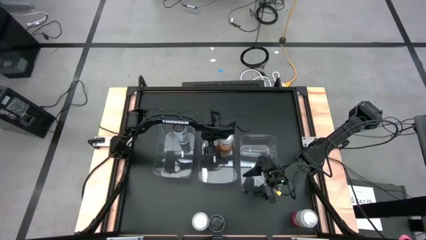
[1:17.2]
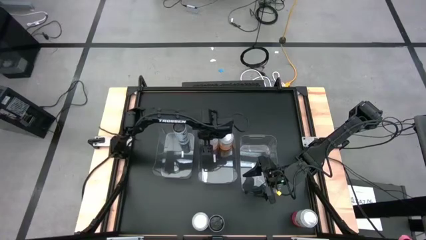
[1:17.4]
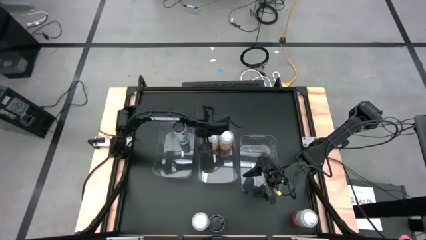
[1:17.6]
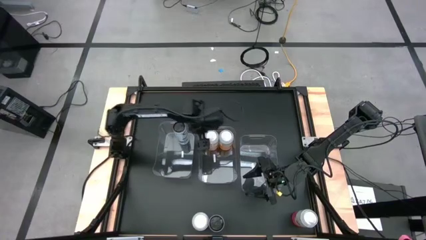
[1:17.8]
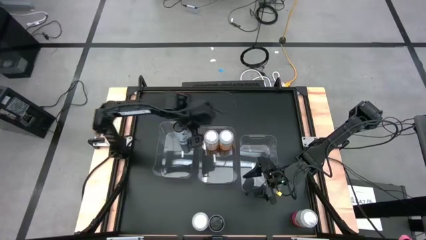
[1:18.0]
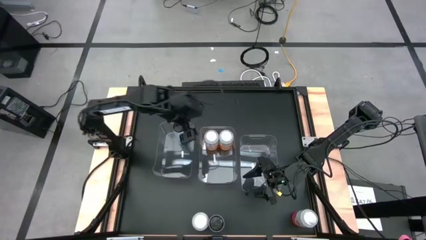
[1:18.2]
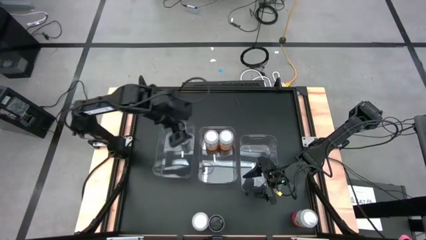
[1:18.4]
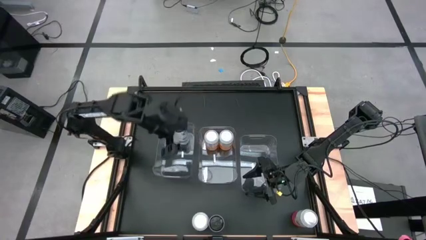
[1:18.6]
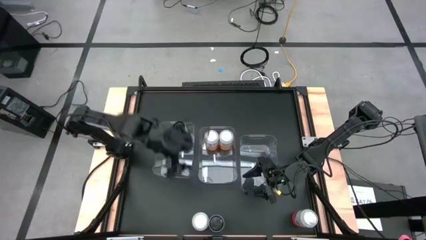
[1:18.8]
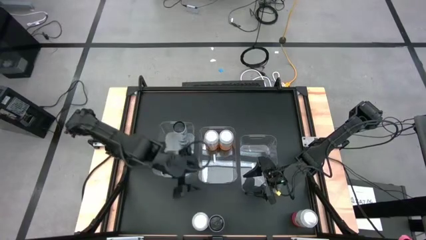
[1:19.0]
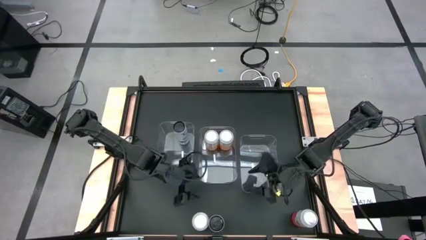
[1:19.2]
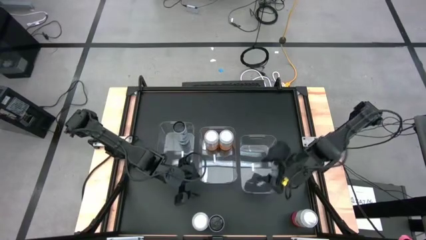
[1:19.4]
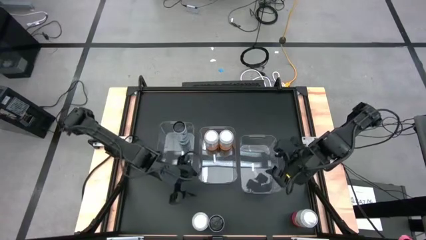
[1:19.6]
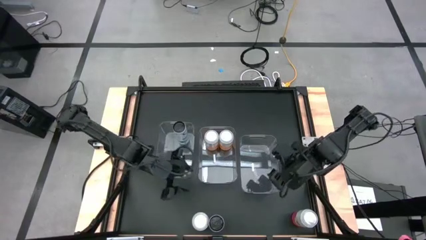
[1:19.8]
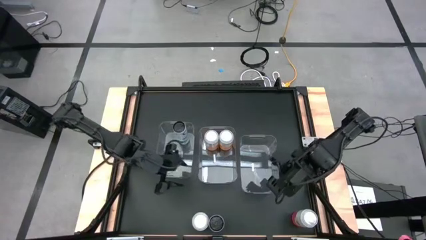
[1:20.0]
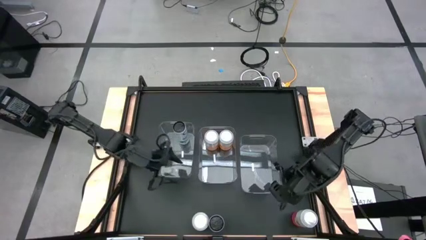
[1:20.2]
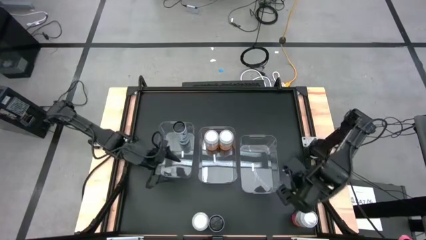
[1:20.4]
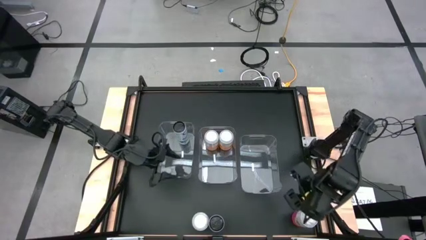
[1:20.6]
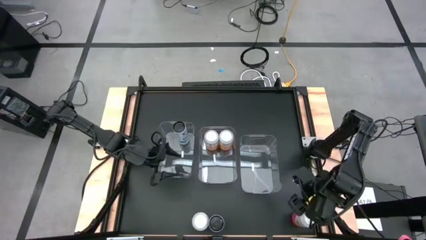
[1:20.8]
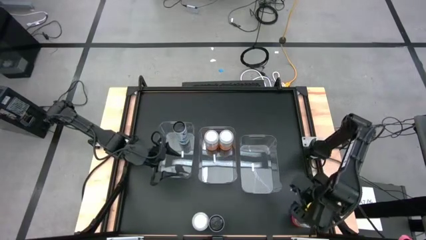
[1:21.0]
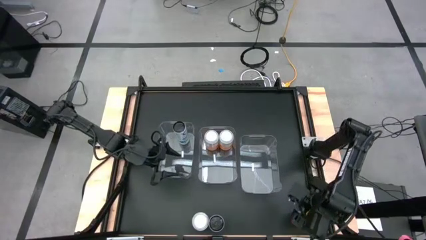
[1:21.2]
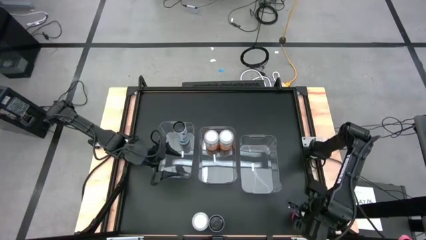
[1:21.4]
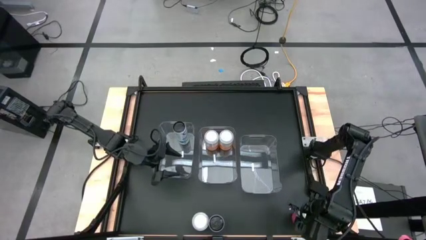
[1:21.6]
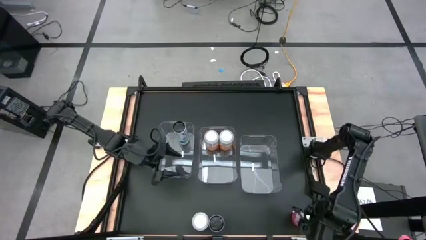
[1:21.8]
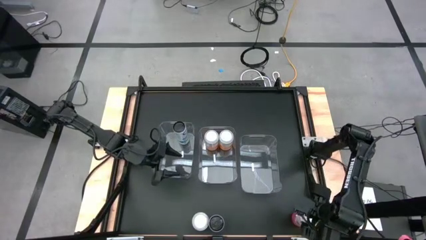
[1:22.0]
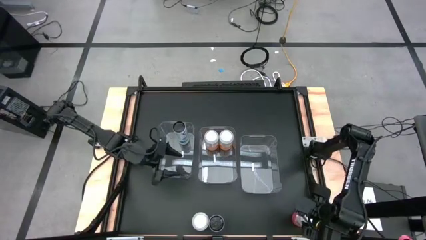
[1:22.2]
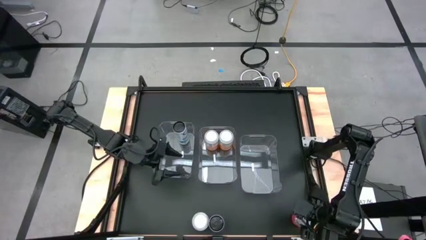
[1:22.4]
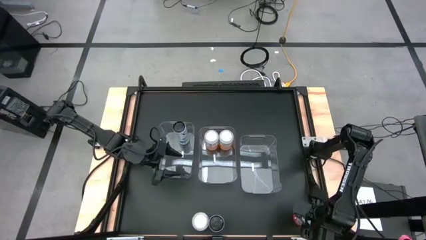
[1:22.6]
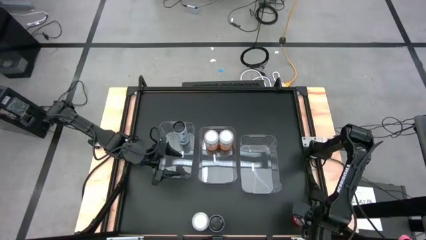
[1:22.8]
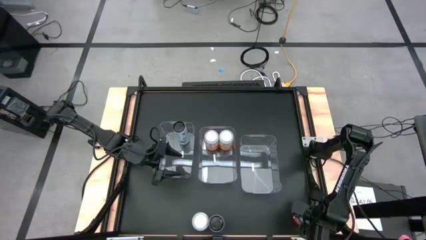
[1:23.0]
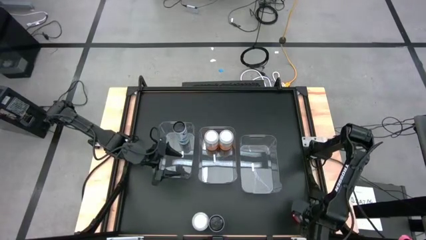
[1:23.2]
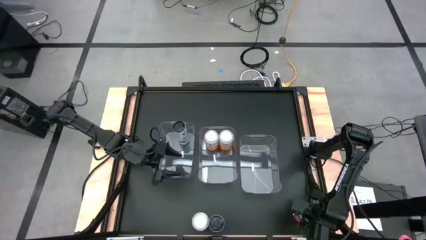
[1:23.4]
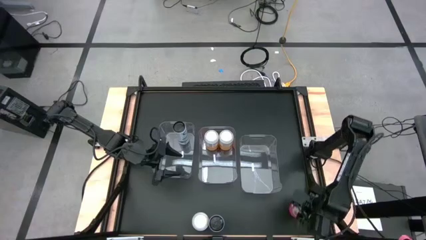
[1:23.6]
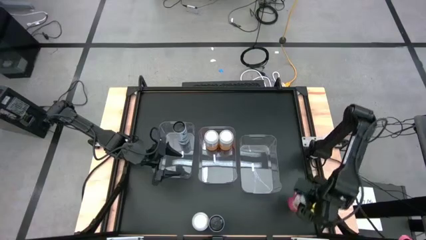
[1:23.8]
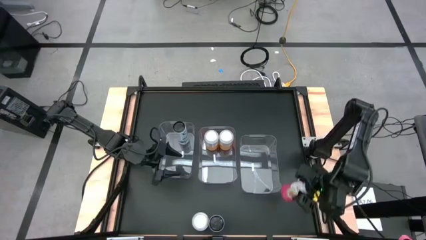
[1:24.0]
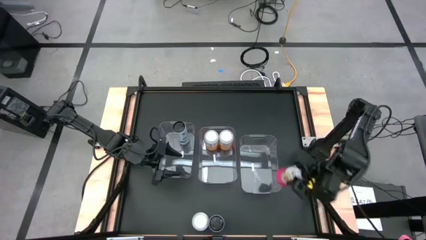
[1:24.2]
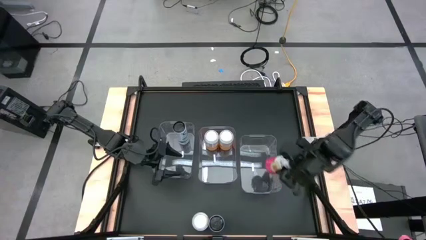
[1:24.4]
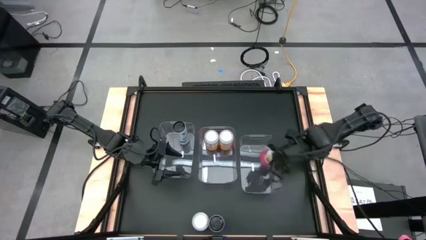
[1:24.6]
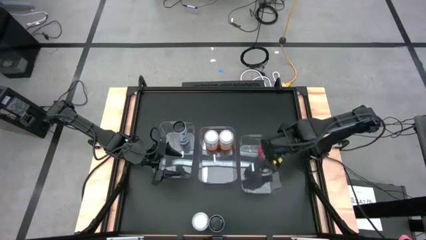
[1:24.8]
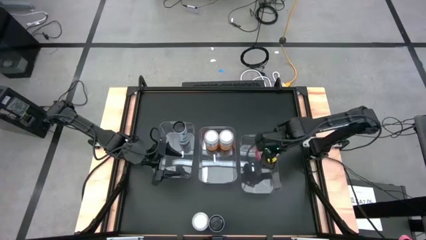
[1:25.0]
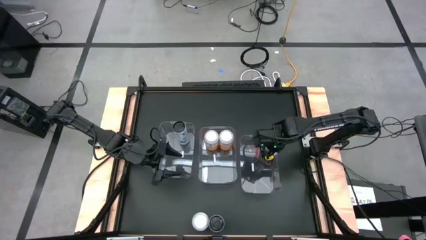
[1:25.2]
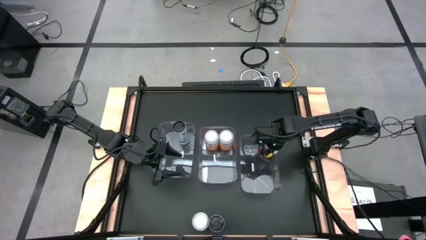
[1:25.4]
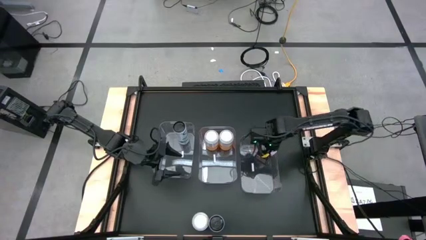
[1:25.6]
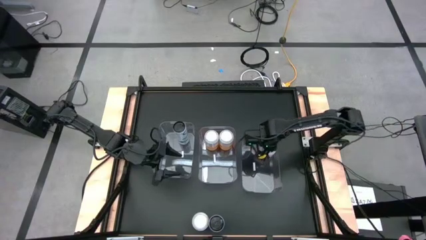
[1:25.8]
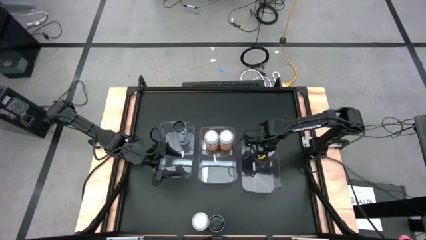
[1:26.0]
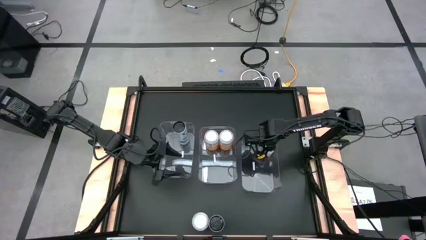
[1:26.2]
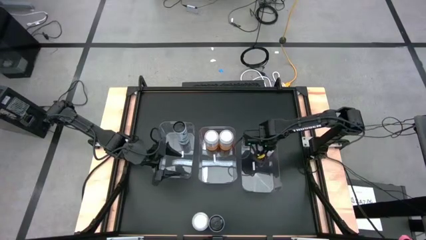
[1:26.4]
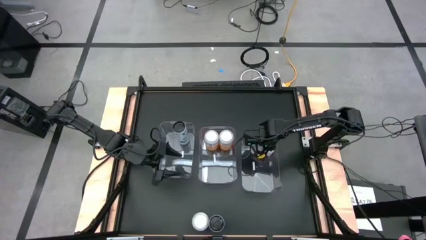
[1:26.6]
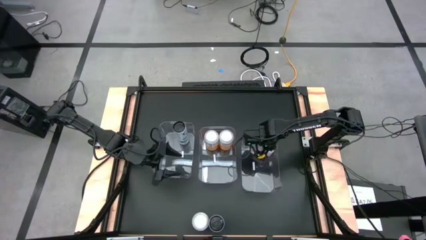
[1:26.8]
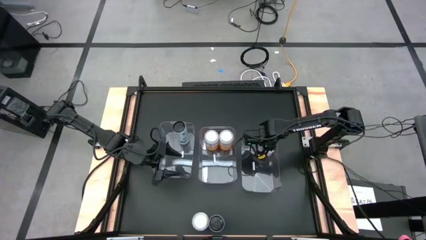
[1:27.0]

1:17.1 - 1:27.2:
Task: Sort soda cans
Put the right pink-white soda can into the right transparent bin

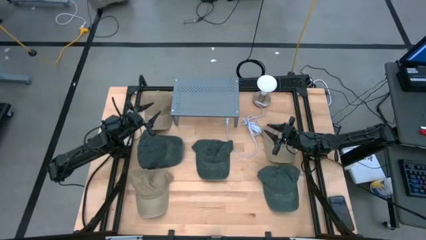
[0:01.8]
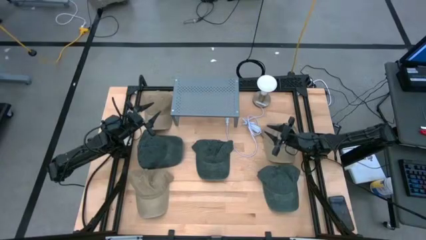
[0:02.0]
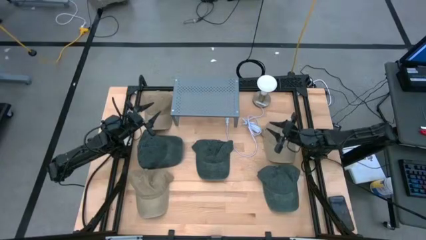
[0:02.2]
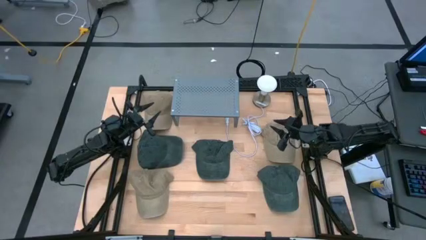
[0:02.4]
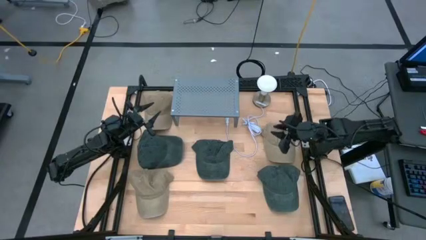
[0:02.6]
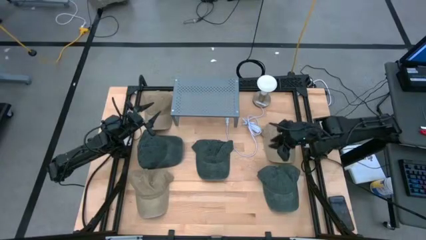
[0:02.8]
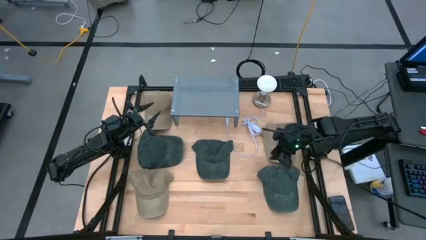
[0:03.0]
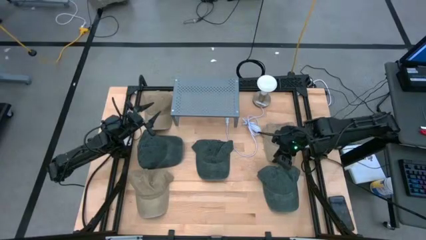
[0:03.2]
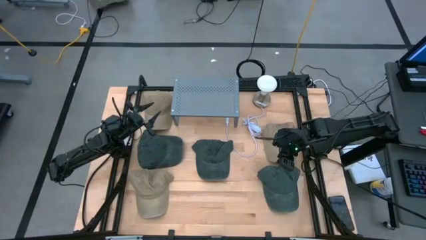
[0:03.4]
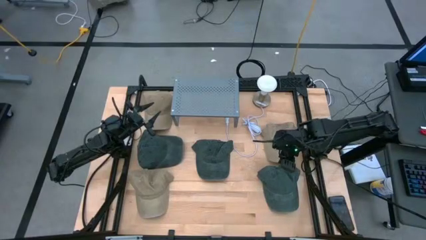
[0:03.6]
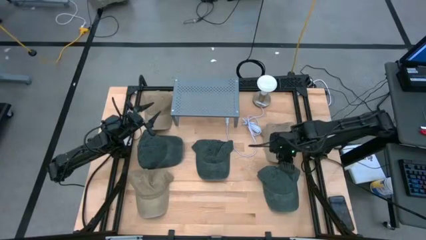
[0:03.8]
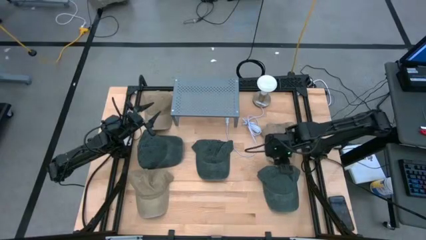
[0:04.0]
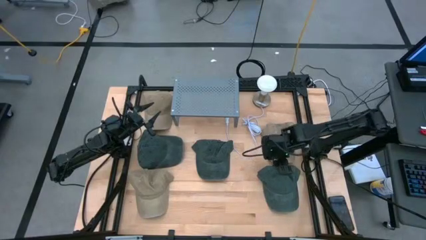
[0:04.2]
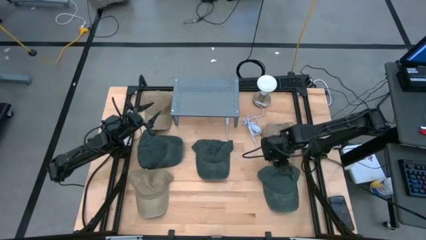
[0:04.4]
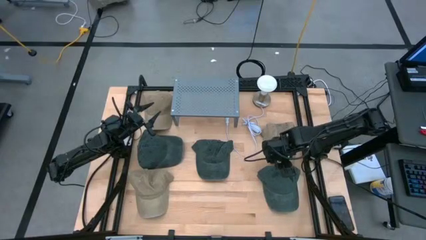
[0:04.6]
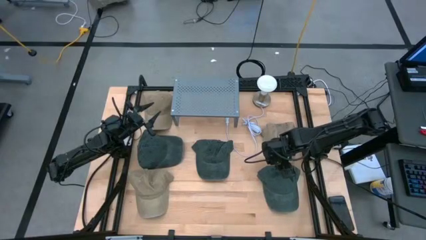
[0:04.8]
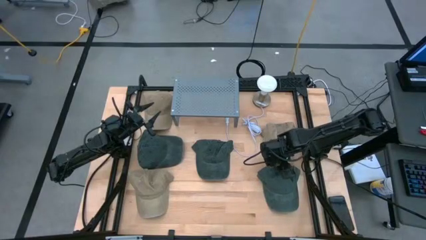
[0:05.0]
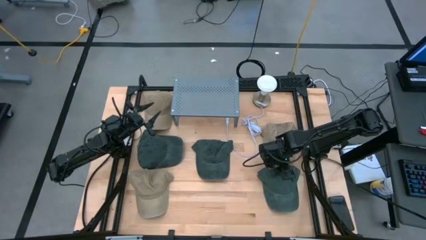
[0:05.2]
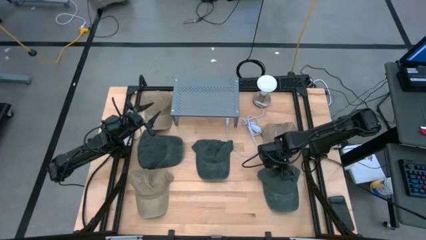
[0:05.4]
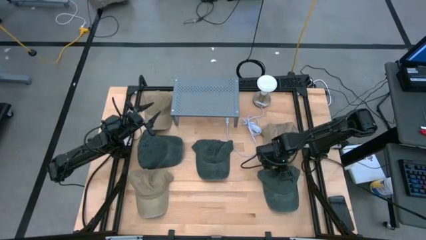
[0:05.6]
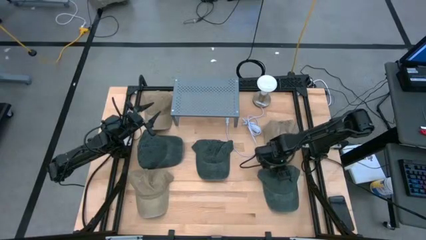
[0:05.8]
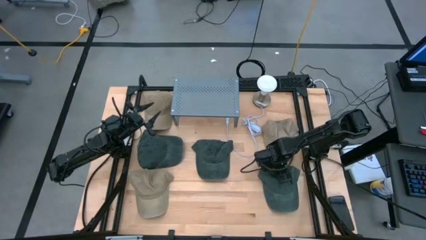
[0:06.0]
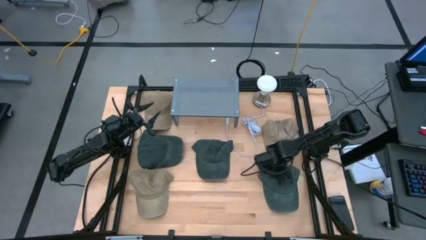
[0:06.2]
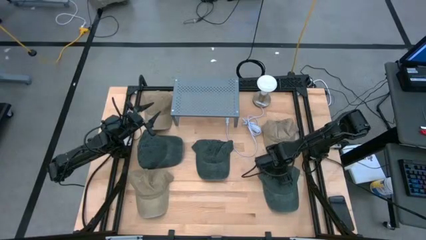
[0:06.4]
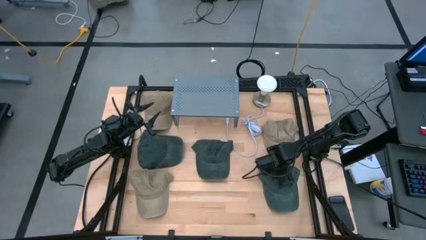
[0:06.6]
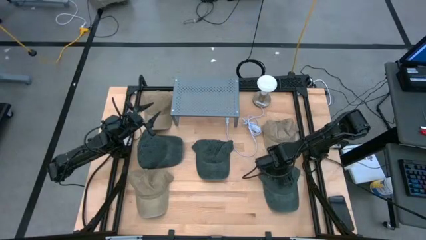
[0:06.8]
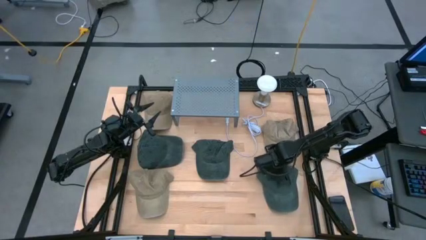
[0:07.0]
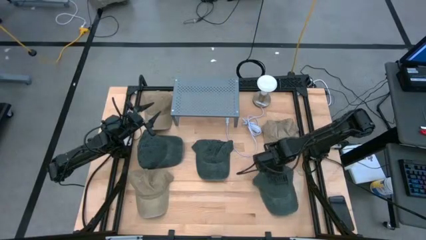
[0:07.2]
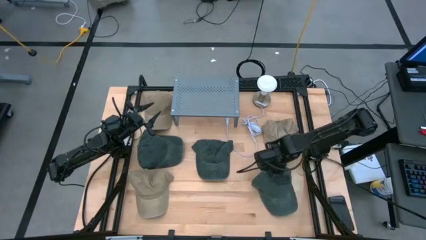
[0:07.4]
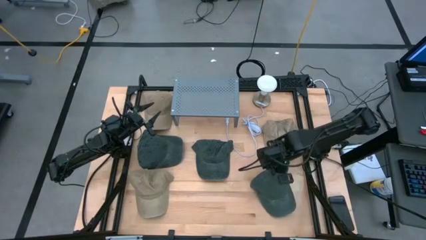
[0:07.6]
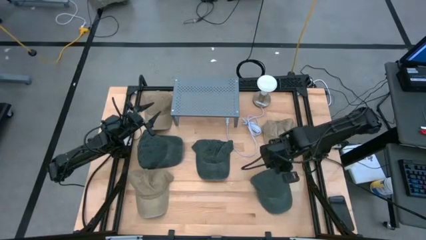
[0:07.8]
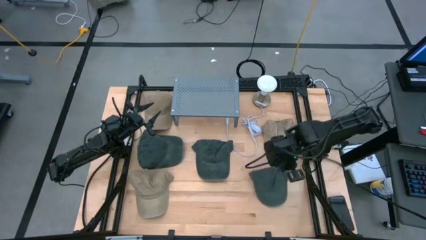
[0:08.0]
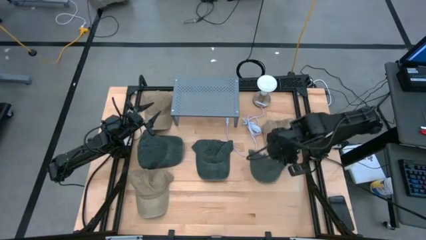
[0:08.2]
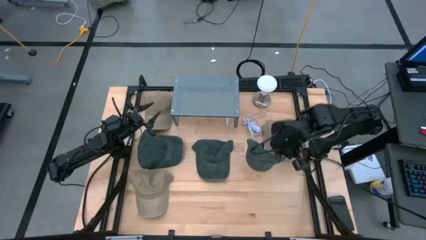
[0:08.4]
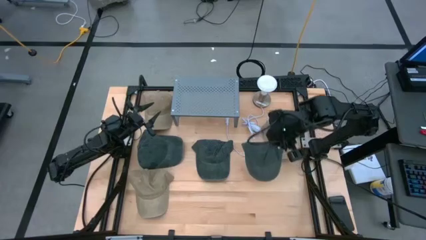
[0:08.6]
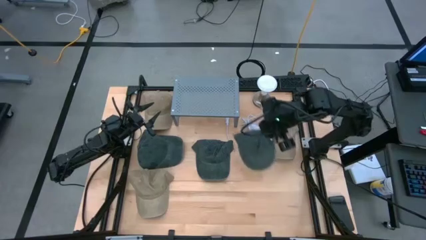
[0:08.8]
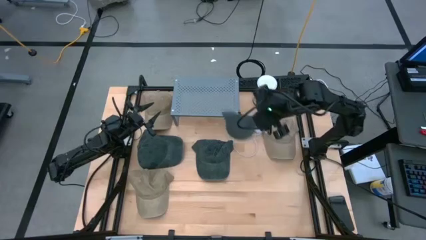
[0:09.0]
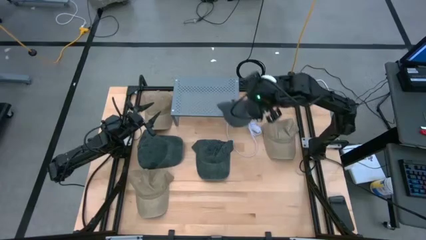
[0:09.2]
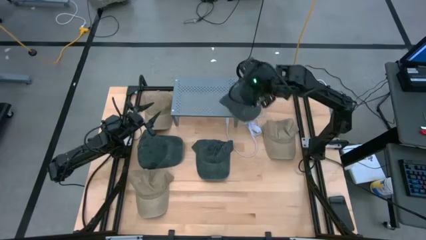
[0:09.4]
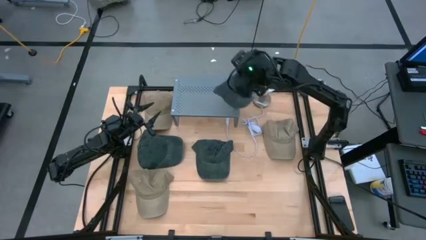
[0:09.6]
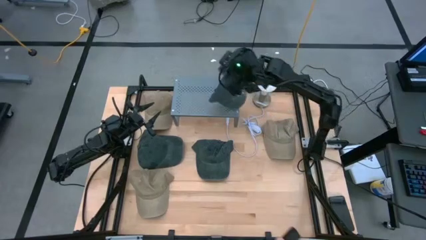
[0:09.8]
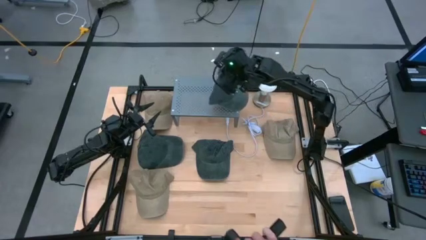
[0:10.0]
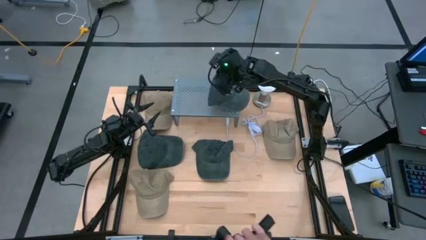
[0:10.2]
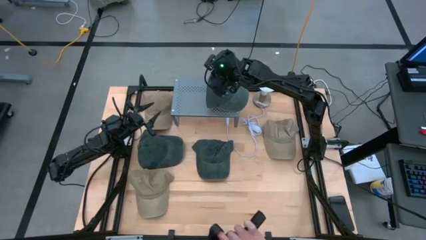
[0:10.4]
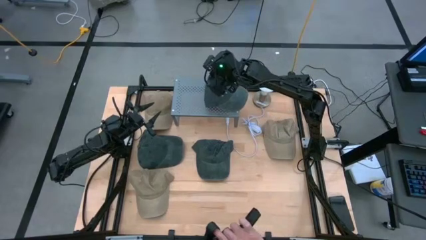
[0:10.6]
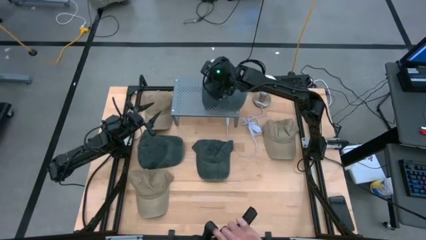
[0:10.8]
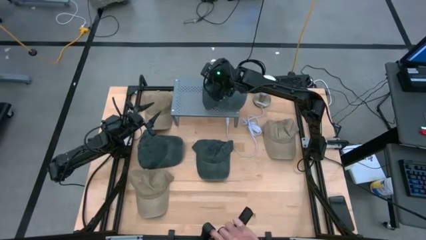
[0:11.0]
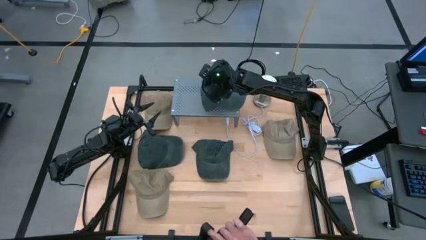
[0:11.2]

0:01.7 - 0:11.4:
Task: Pick & Place hat
Put the bottom right gray cap on the shelf
